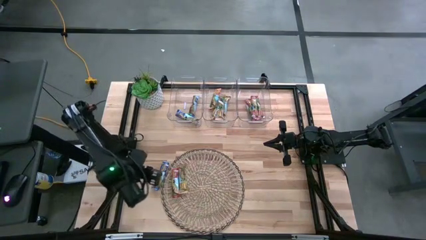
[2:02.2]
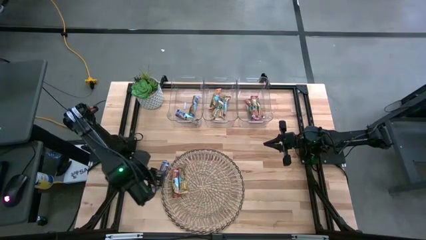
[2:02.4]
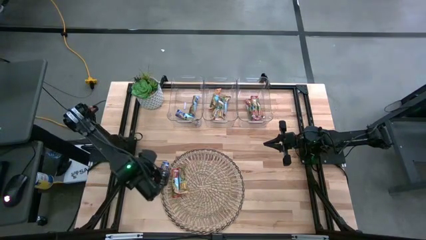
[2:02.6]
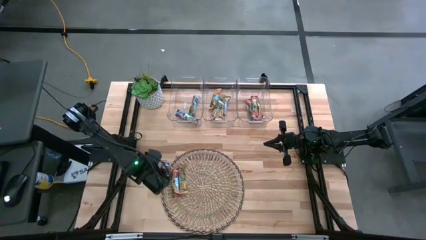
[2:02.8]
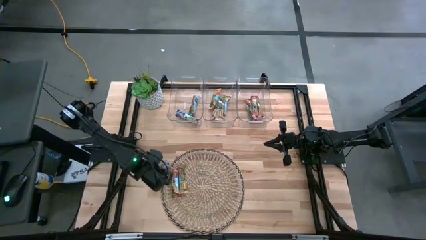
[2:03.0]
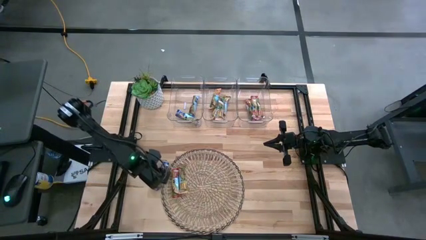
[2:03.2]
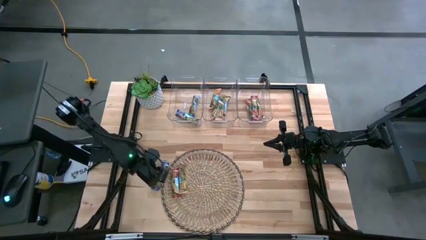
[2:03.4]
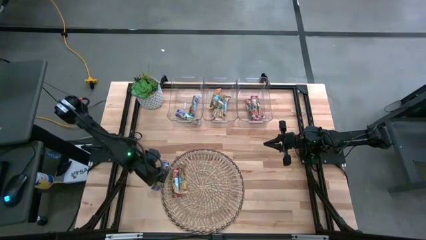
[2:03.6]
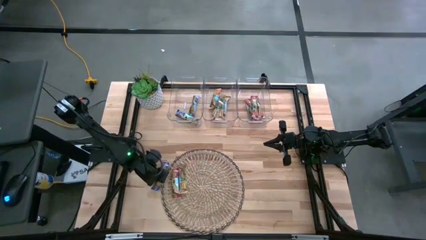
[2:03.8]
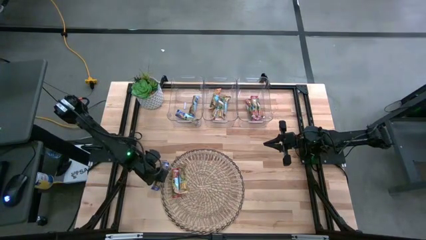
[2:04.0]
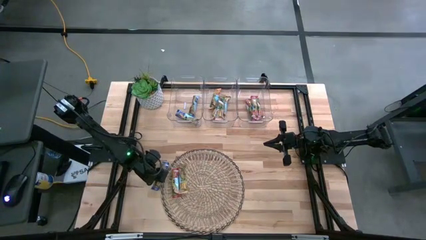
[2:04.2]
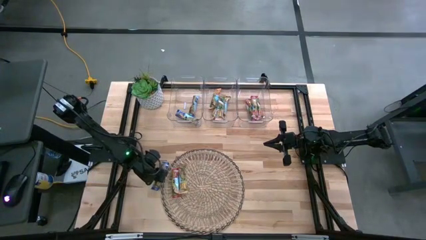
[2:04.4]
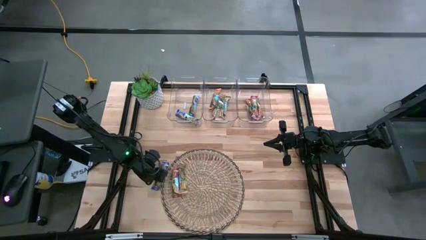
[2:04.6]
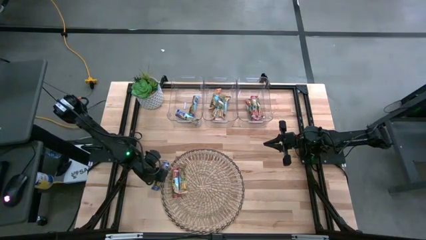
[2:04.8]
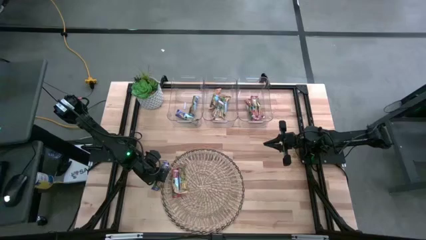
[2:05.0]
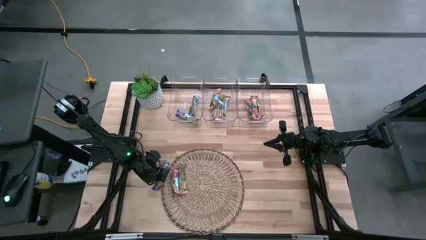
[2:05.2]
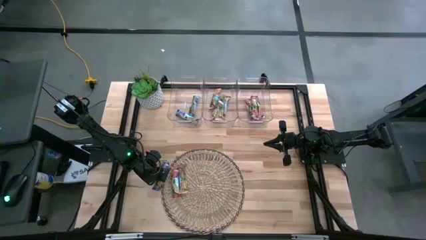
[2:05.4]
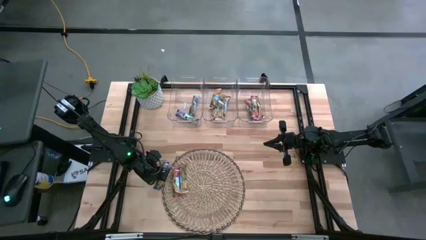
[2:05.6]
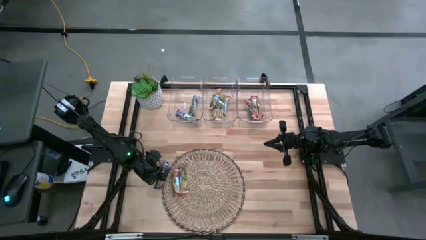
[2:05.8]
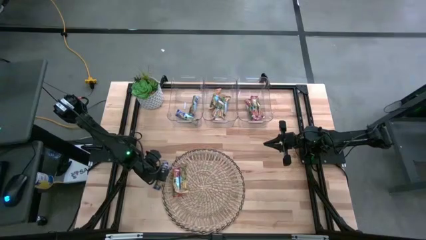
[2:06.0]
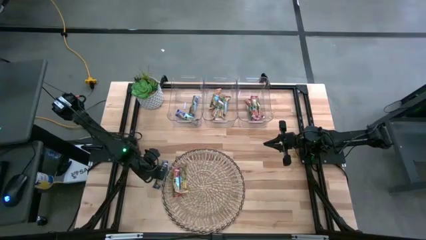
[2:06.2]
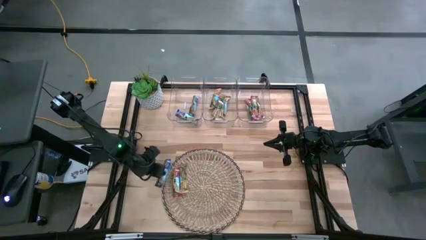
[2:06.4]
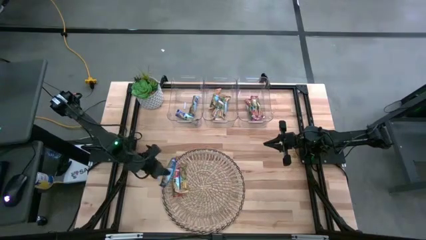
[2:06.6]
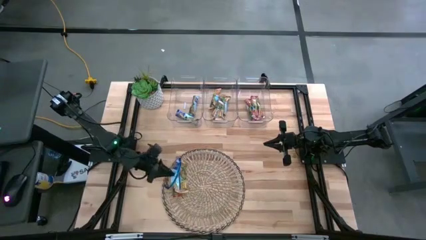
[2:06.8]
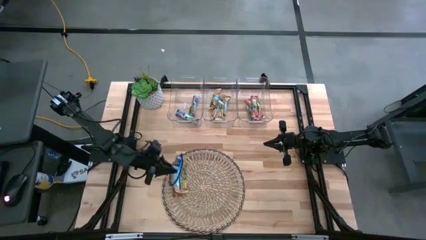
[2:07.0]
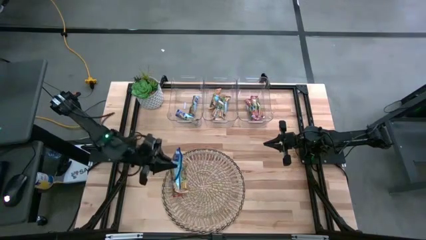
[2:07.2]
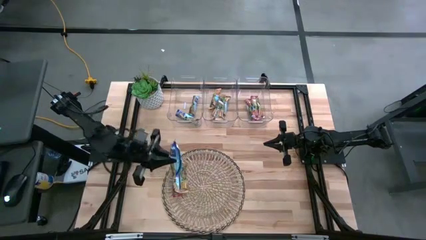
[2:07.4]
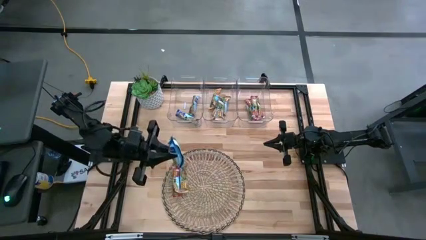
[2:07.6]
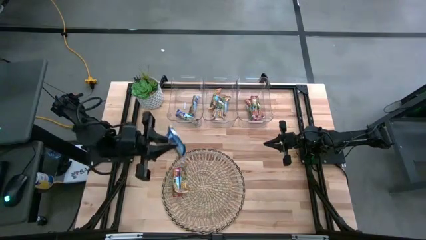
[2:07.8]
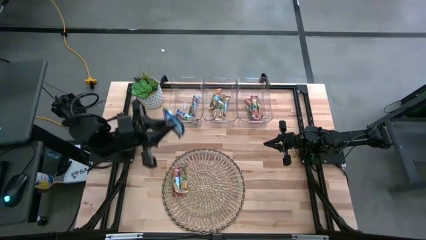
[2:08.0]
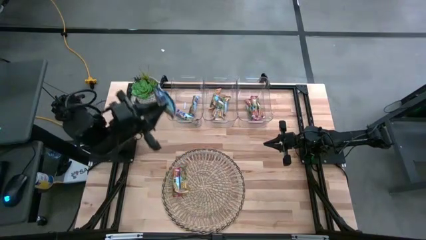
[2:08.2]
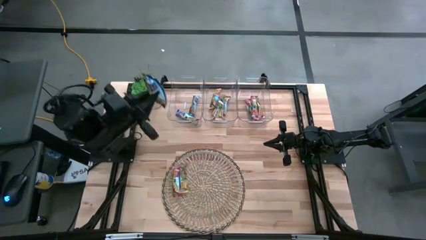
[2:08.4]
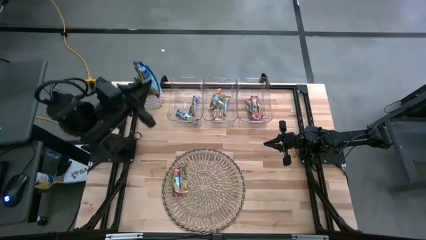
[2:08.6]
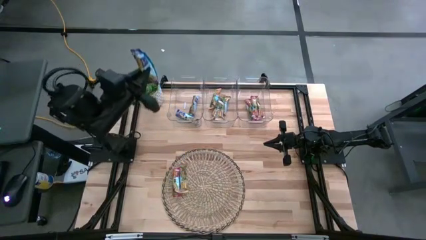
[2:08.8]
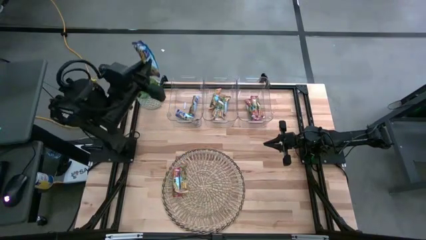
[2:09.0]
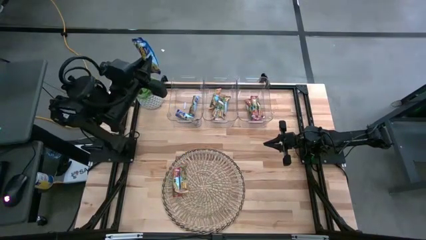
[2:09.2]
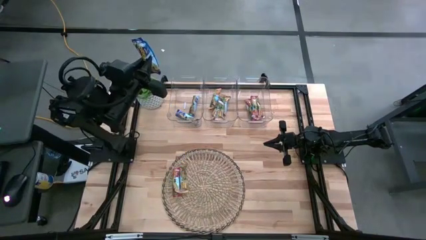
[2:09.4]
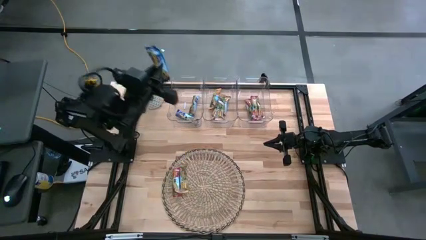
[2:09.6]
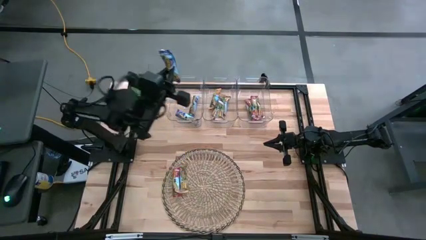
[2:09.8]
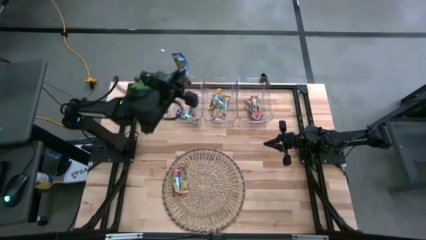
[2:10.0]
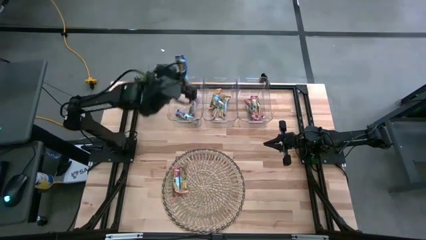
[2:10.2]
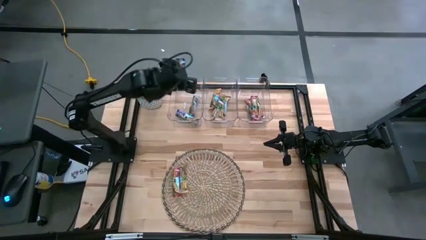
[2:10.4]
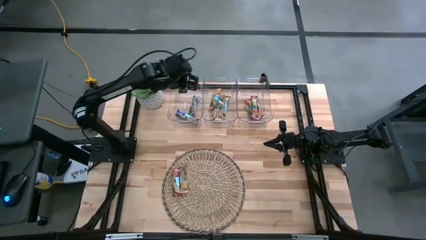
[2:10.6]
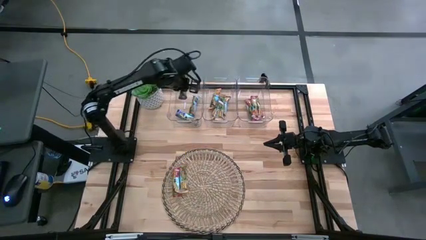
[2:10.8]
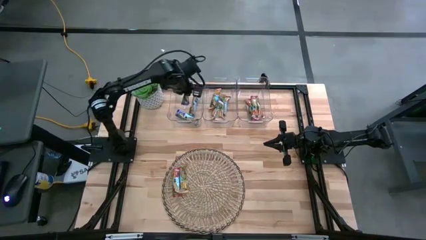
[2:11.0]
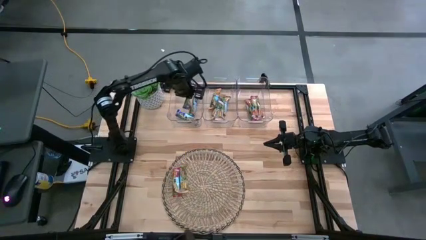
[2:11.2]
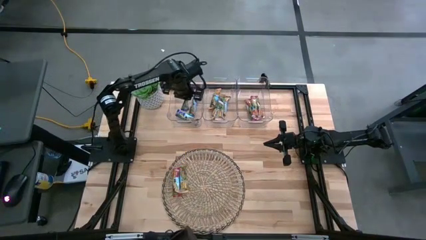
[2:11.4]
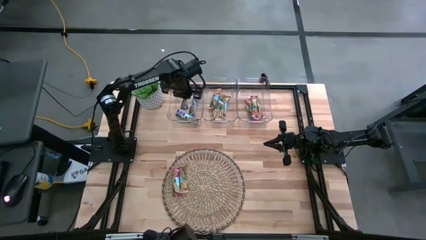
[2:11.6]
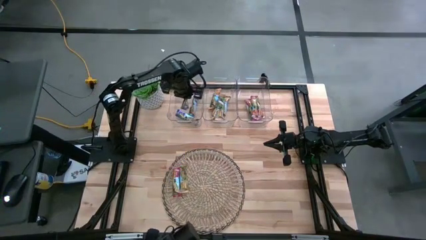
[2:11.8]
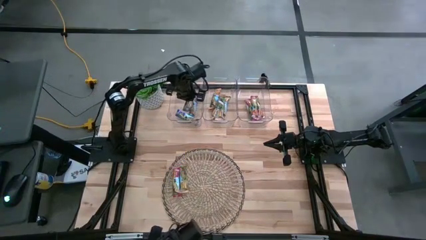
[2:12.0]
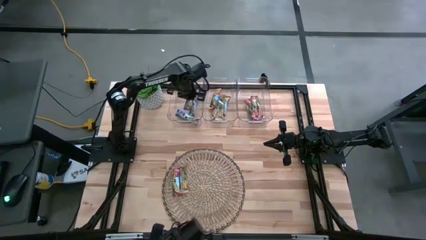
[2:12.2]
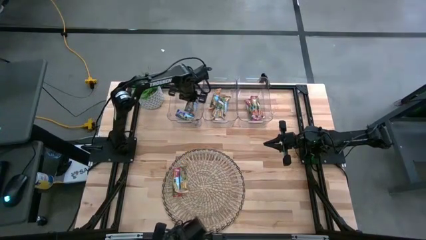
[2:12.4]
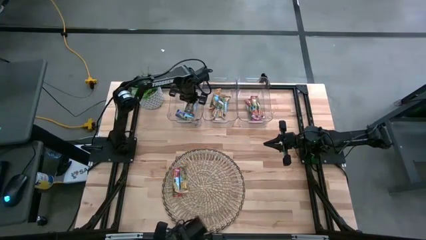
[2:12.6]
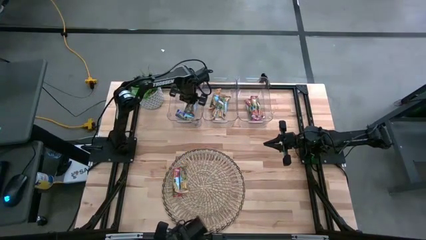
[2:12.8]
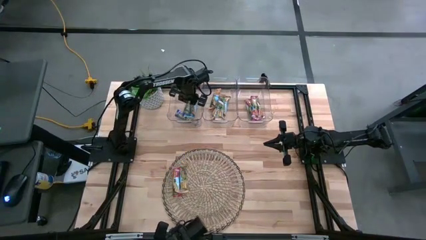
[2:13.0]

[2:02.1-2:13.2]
Task: Pick and place Granola Bars by type
Put the blue granola bar into the left transparent bin

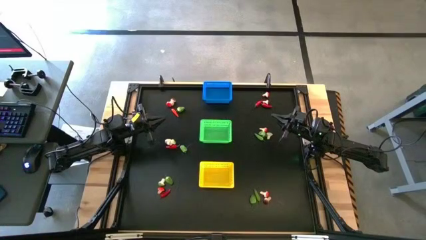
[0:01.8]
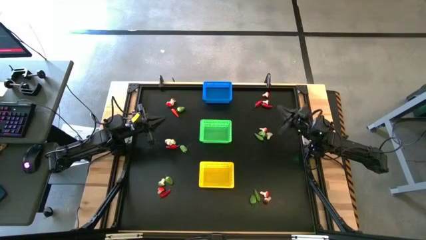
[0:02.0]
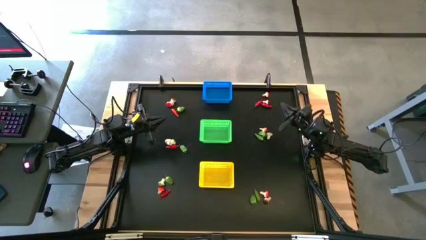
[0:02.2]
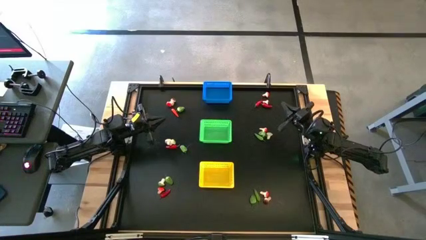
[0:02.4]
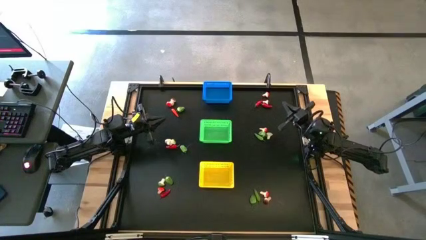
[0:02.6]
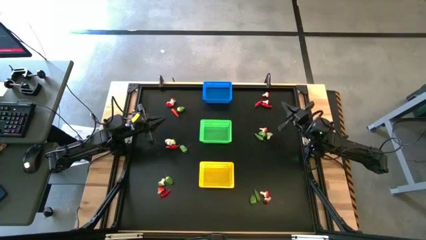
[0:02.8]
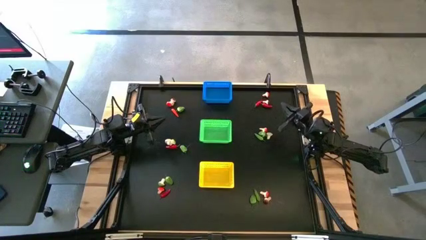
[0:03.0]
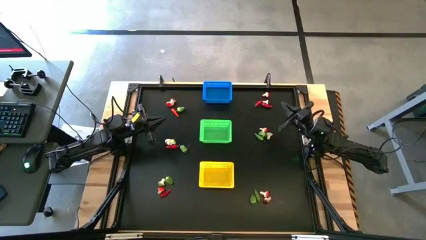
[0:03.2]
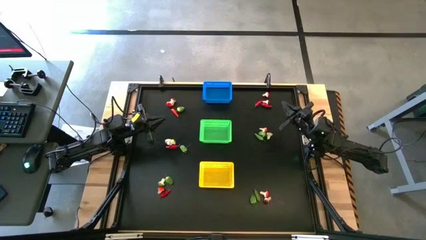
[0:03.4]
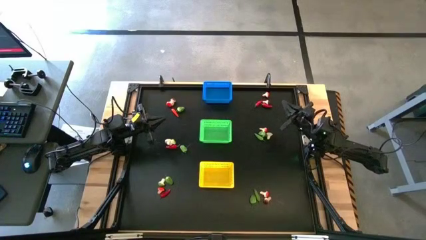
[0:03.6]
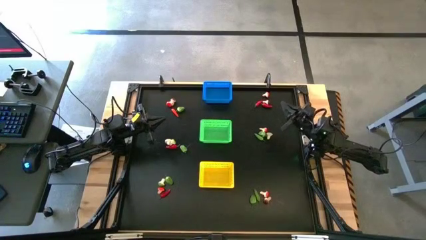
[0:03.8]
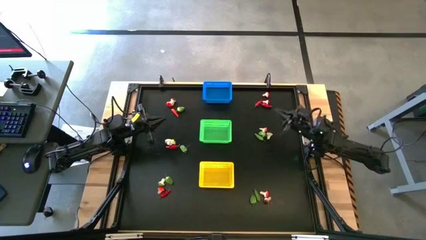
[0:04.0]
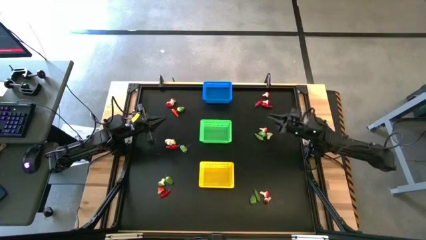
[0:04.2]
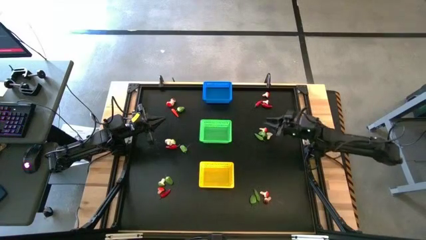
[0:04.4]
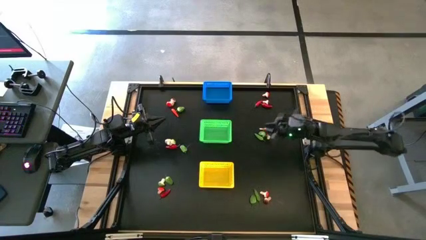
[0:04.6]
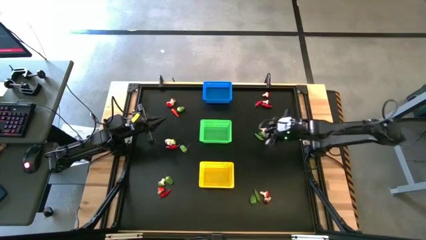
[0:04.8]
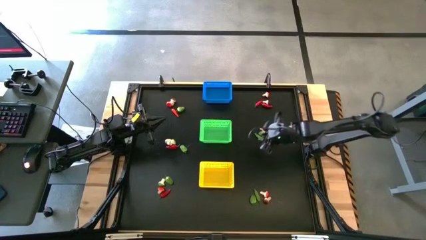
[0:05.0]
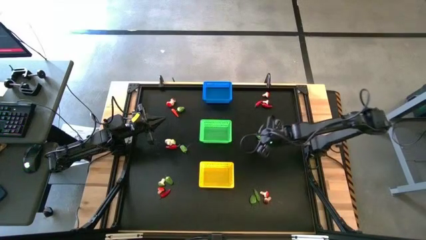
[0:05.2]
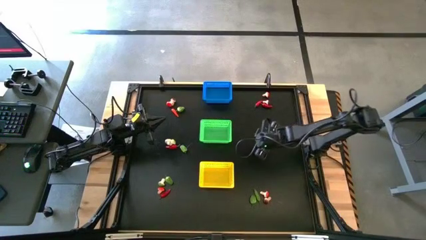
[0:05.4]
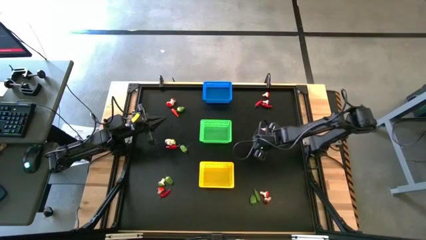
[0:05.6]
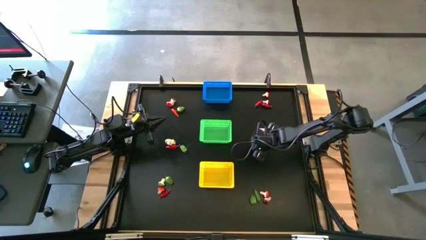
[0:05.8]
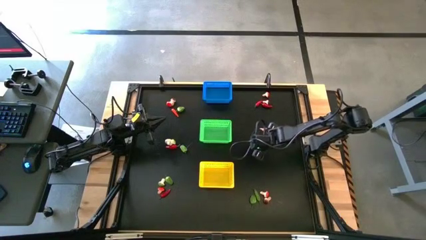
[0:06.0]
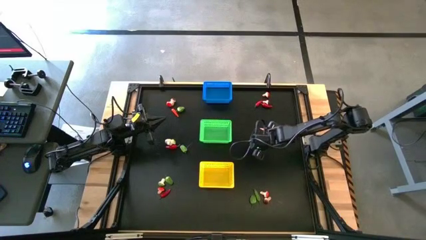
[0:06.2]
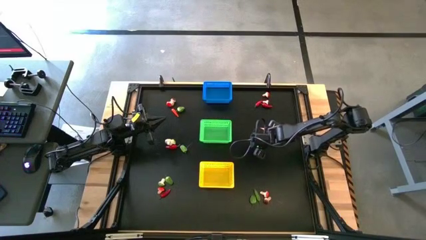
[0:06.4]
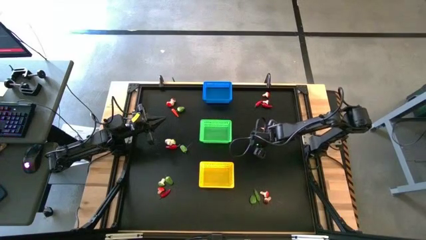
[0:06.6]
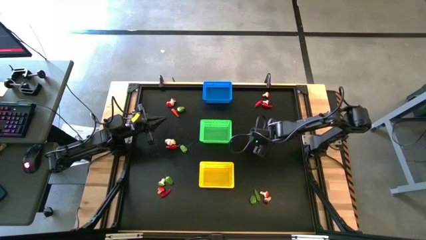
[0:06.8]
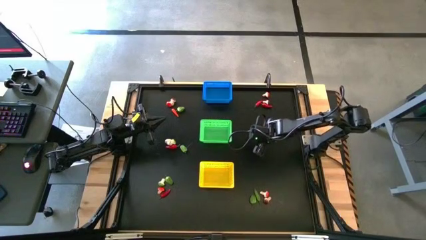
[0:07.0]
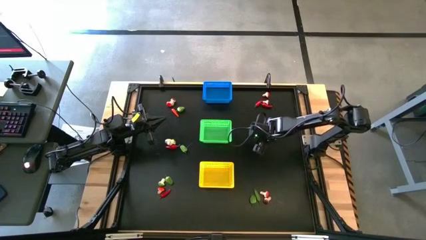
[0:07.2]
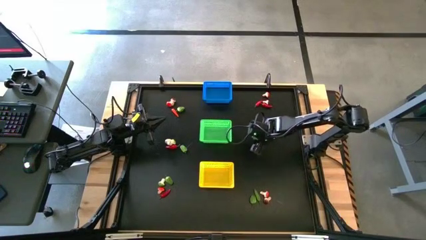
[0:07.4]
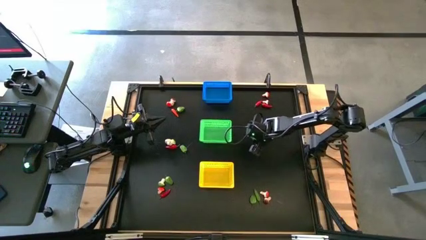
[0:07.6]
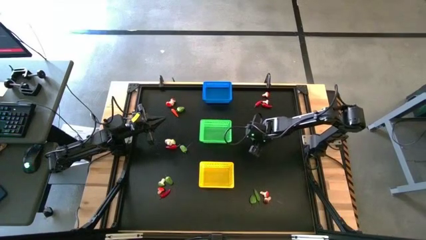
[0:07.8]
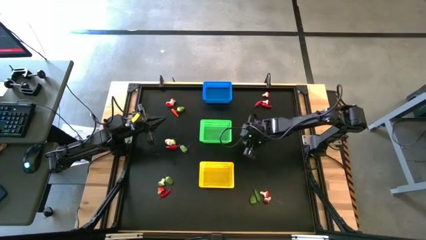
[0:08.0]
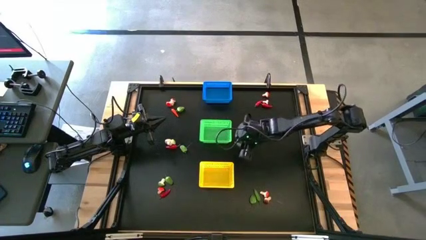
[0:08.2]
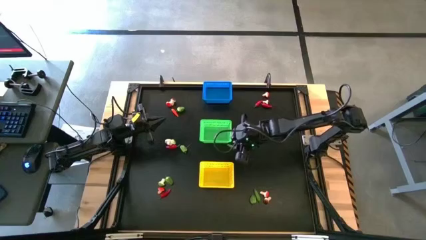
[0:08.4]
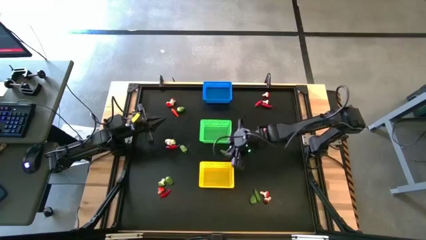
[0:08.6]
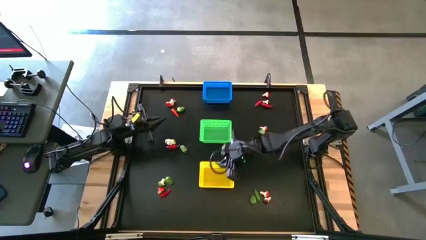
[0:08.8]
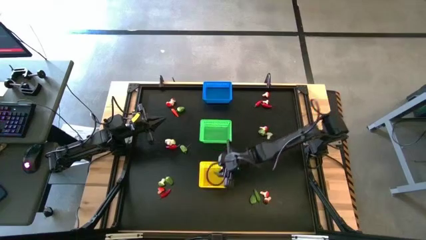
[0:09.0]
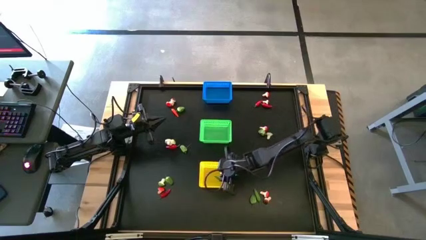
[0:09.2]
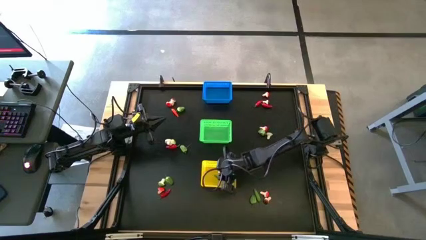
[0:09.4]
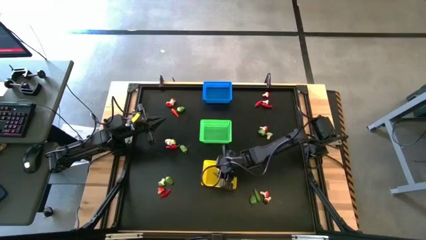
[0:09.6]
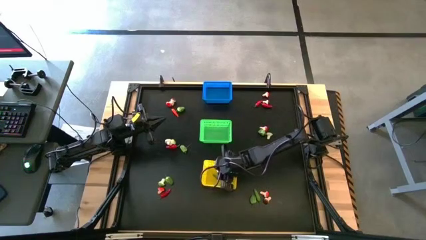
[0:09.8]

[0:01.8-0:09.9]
Task: Sort produce into baskets
Put the green chili pepper into the yellow bin
